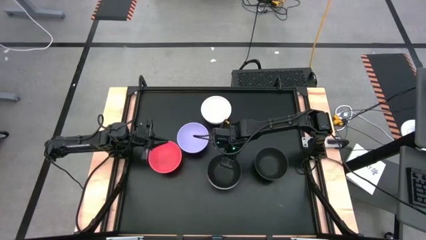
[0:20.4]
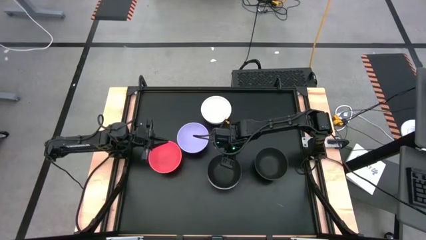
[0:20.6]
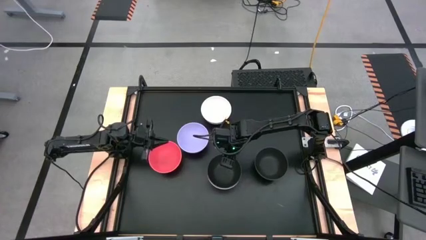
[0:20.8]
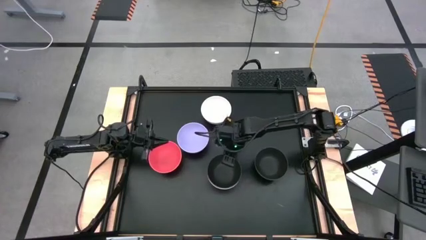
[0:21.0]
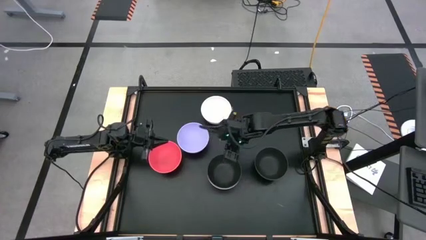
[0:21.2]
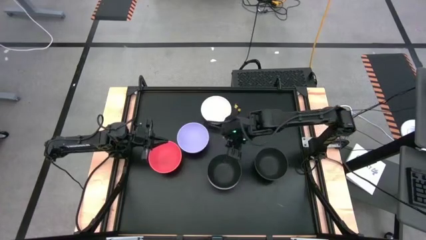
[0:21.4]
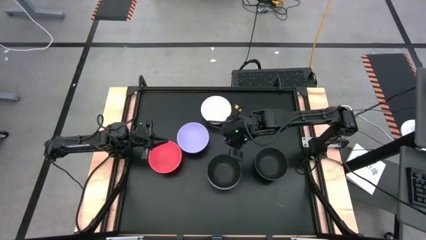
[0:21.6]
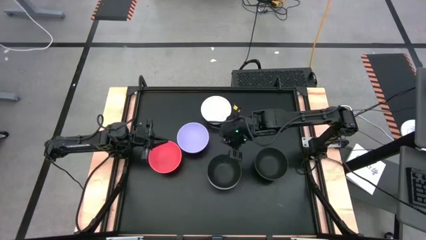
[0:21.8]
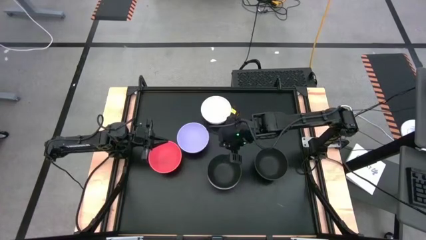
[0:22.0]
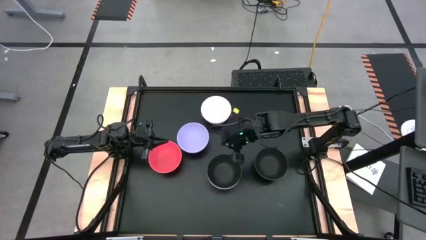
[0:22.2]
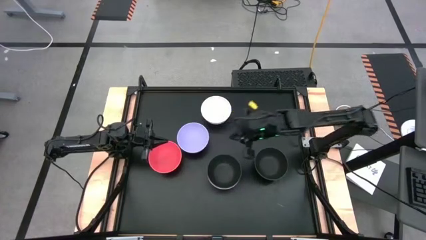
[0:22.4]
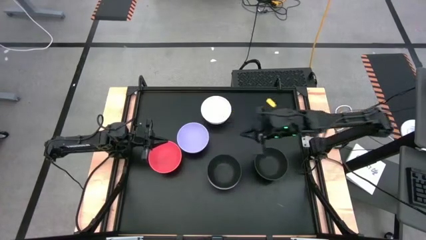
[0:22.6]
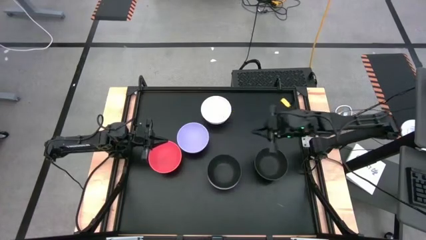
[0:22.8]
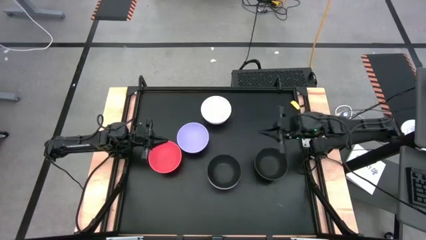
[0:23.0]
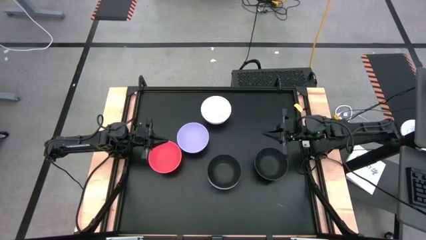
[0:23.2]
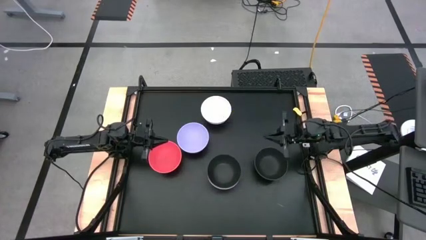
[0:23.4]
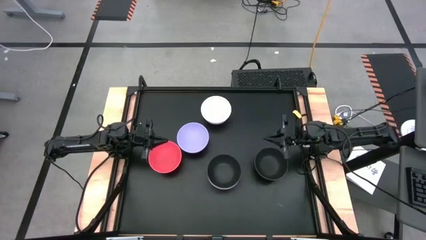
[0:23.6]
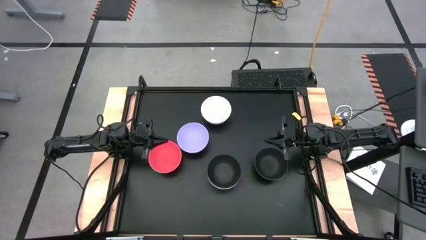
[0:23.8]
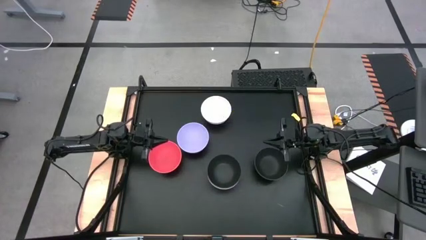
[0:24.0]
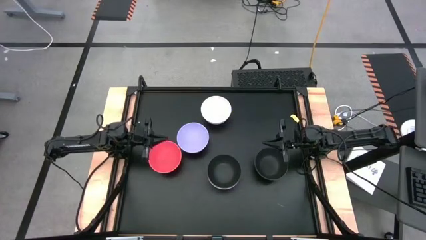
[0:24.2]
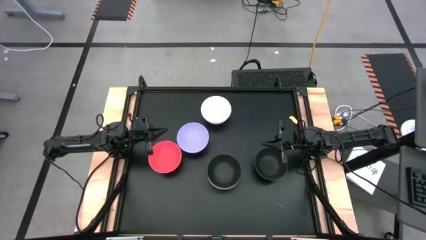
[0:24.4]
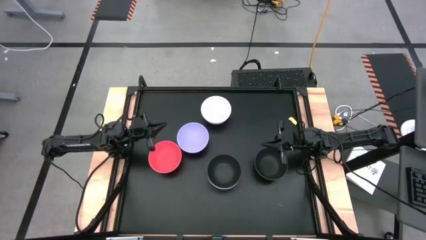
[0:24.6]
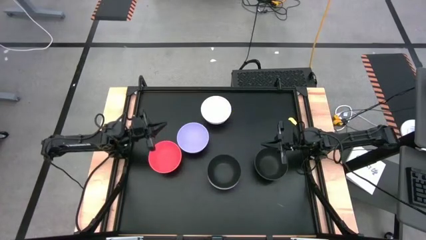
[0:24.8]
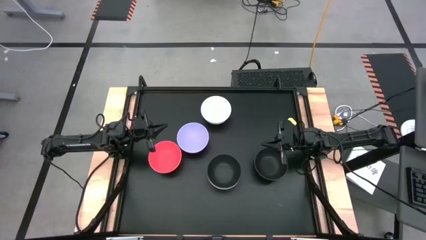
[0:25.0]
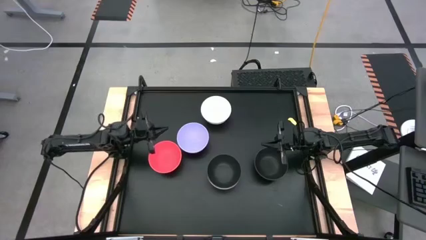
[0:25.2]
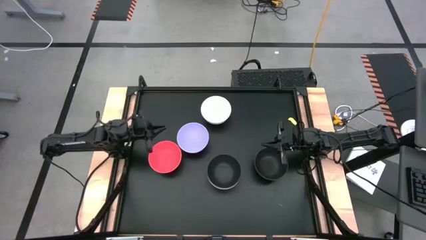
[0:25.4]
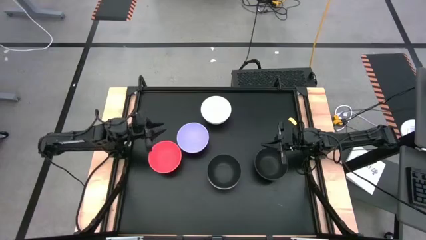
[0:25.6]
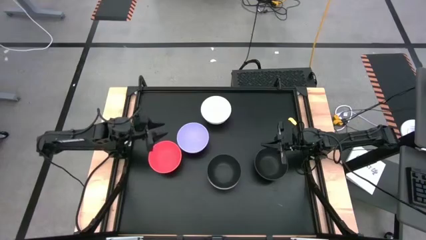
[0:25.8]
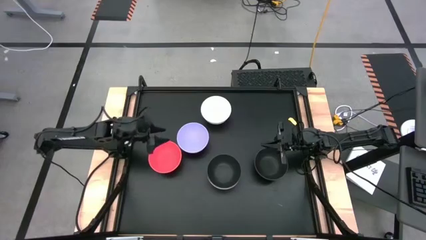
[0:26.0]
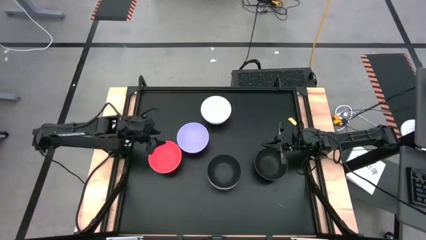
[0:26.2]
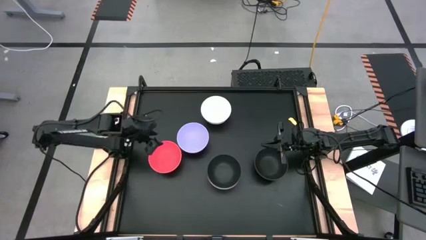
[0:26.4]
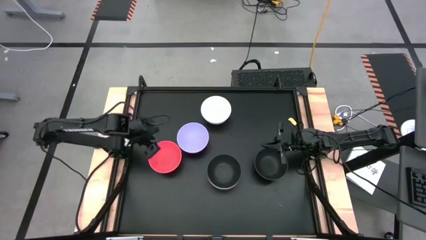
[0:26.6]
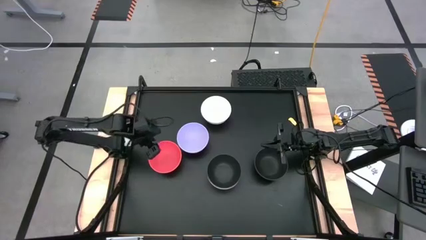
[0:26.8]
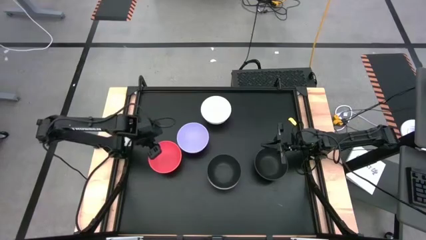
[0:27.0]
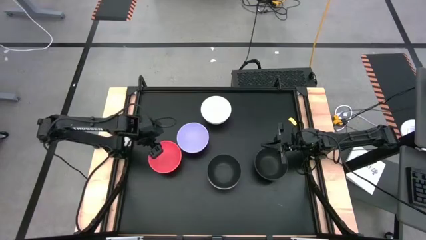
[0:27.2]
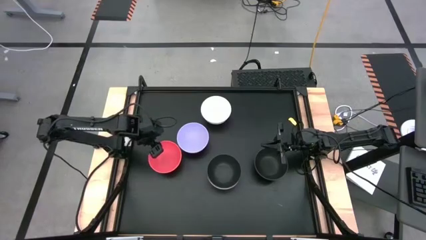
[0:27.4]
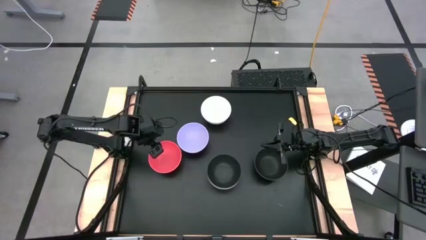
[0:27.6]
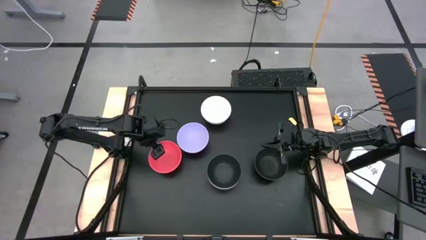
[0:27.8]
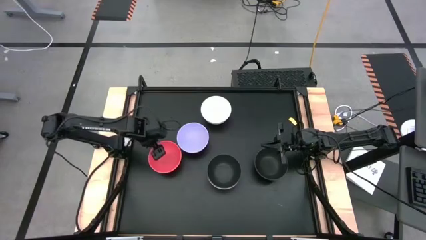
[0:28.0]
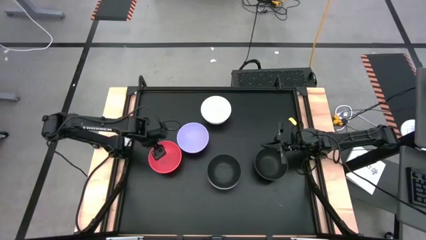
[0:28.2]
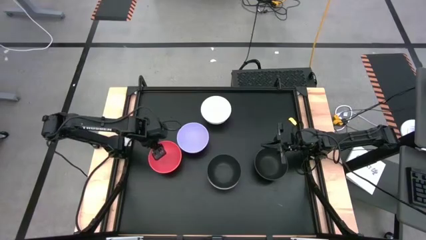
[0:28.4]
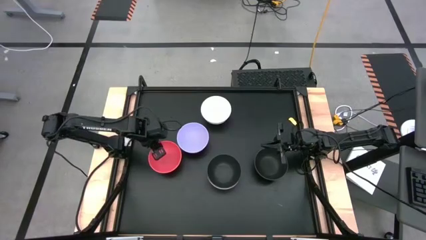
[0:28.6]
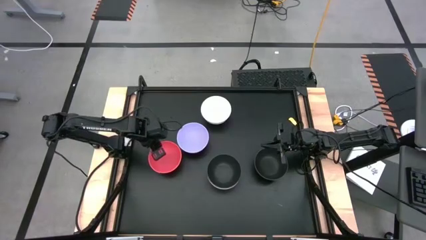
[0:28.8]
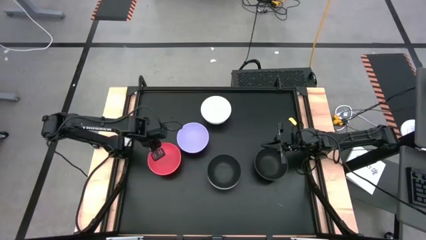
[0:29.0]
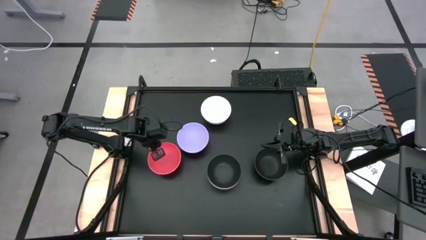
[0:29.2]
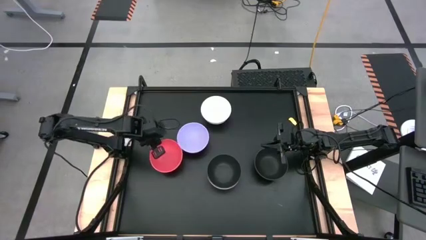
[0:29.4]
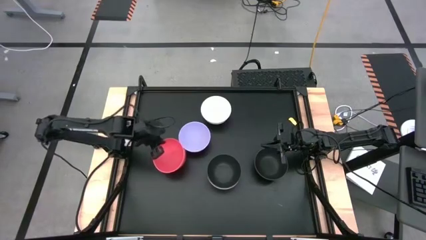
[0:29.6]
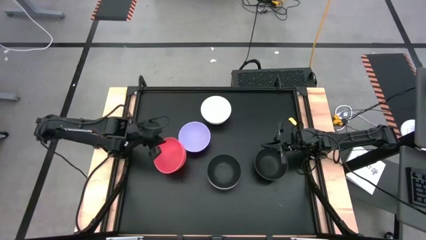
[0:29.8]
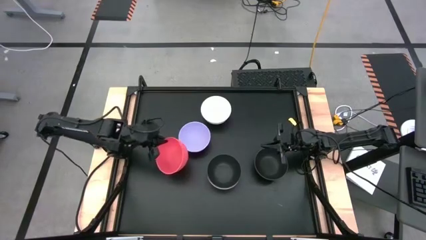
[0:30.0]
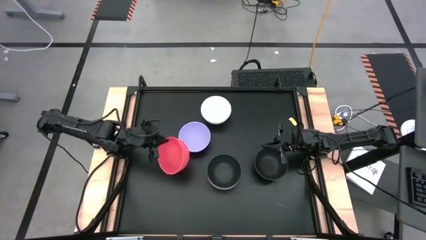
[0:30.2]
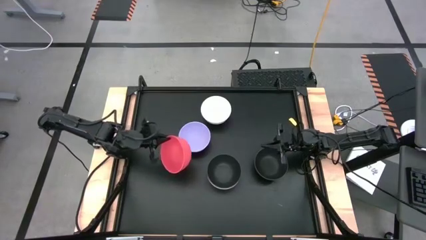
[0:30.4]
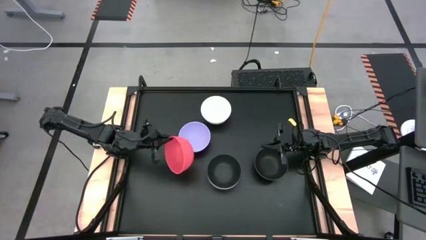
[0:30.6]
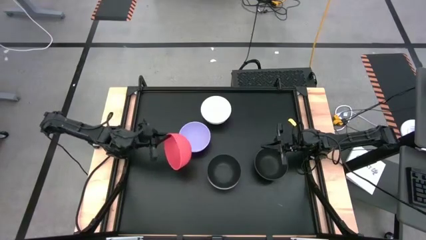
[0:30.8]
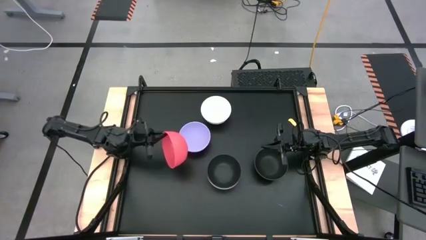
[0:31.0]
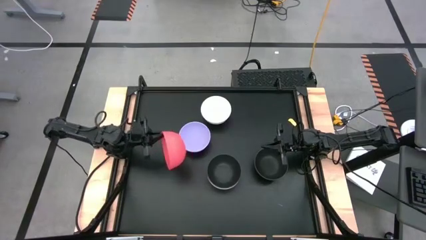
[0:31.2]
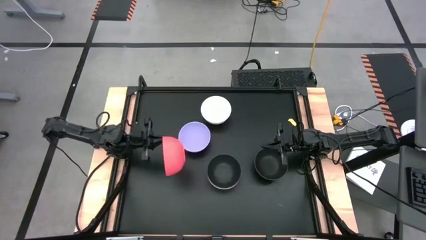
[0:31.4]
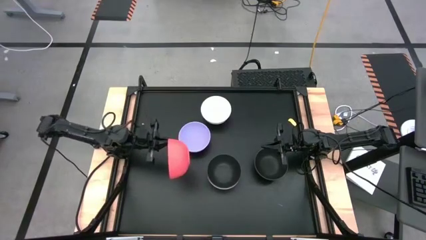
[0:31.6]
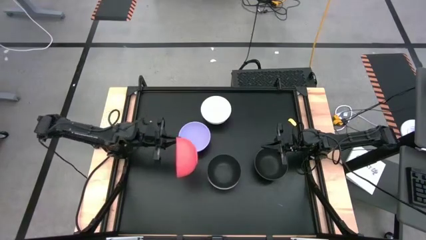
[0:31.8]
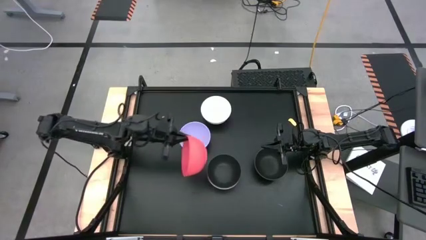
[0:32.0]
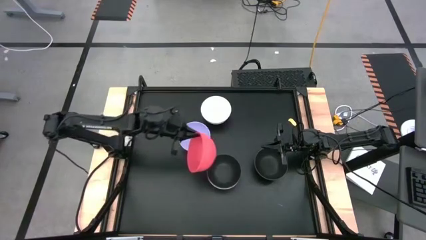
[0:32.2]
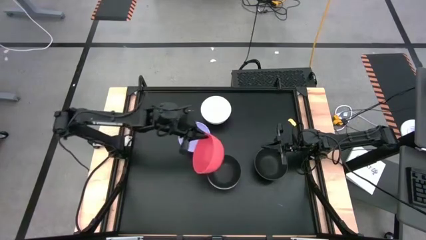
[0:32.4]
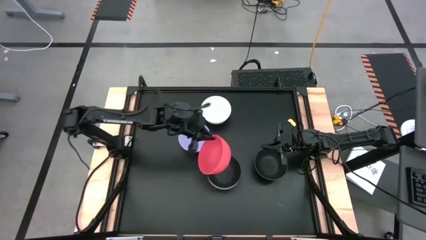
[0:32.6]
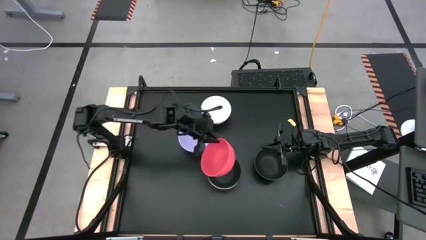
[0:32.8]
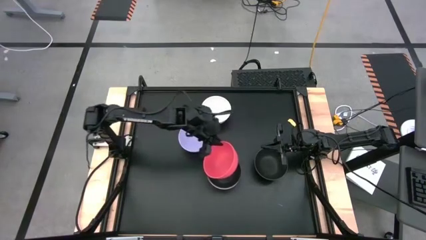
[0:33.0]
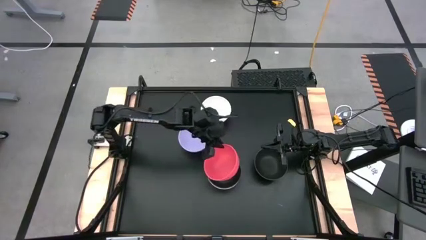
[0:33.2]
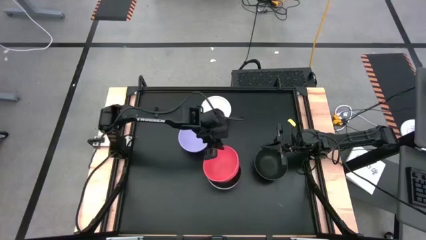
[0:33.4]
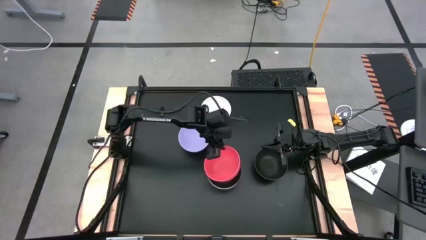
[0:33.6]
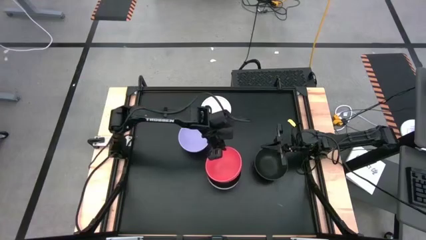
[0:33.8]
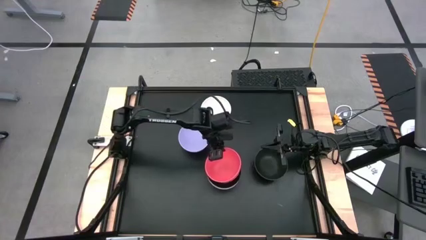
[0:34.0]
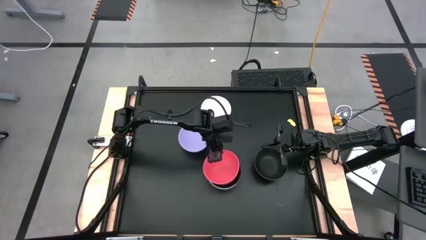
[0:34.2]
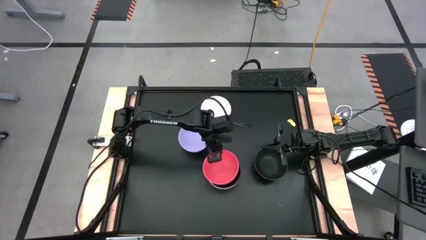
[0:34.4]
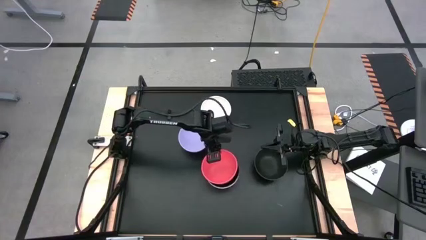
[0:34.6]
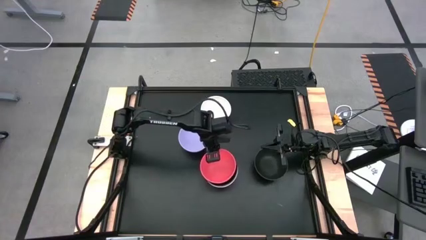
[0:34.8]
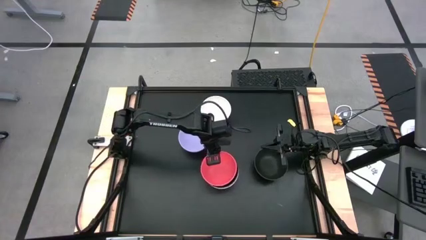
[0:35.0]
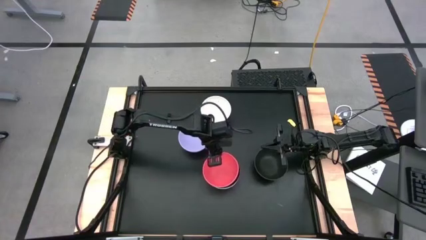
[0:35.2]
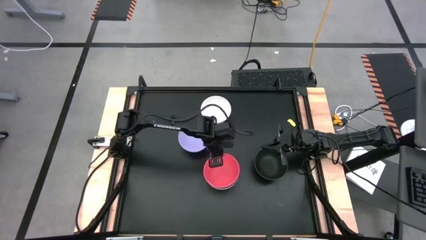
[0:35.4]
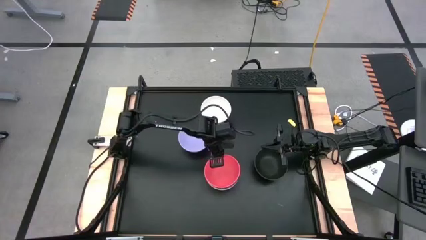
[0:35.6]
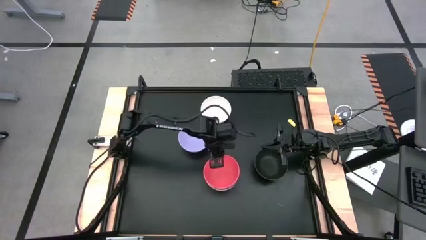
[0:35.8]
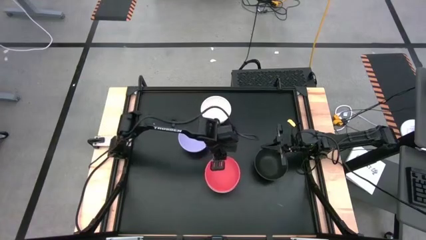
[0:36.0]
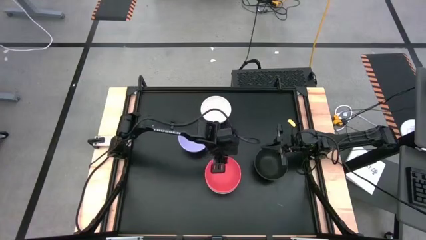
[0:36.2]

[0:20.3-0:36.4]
Task: Nest bowls inside each other
Stack the orange bowl on the top black bowl
